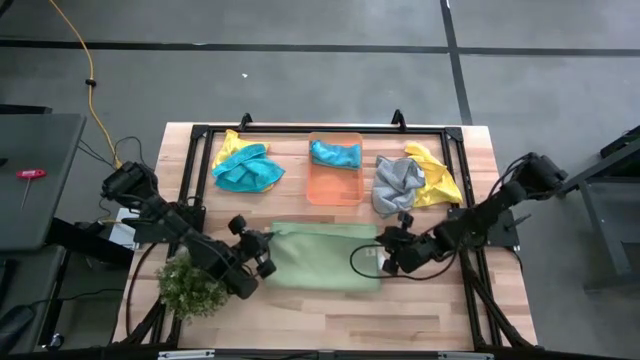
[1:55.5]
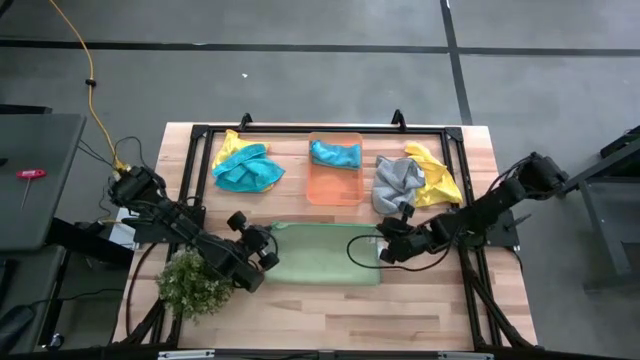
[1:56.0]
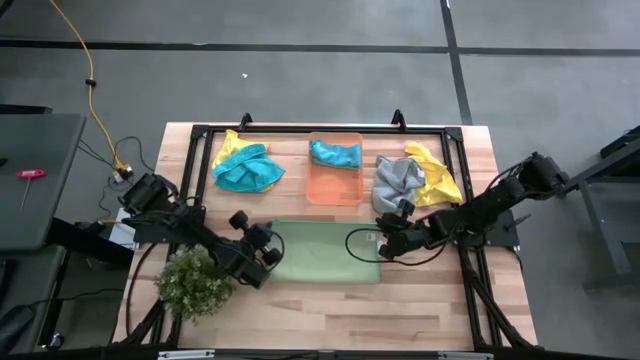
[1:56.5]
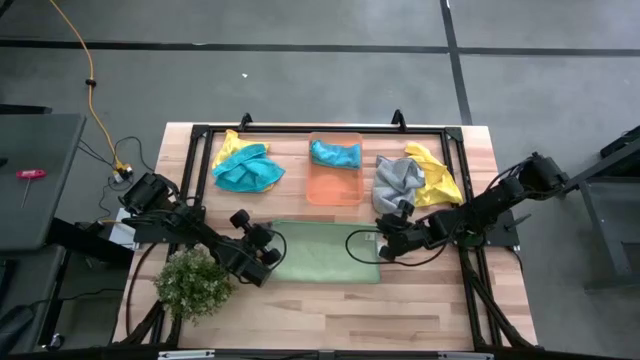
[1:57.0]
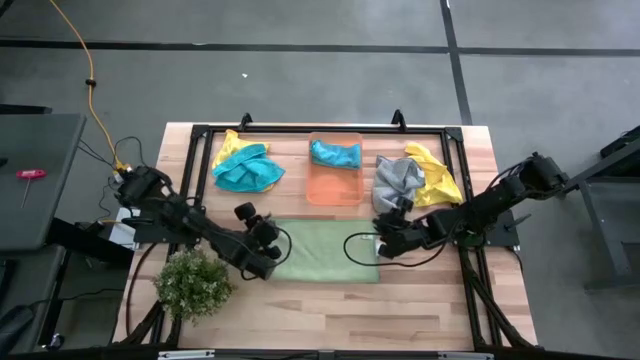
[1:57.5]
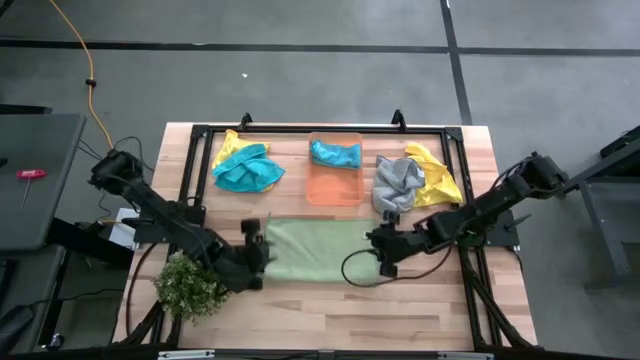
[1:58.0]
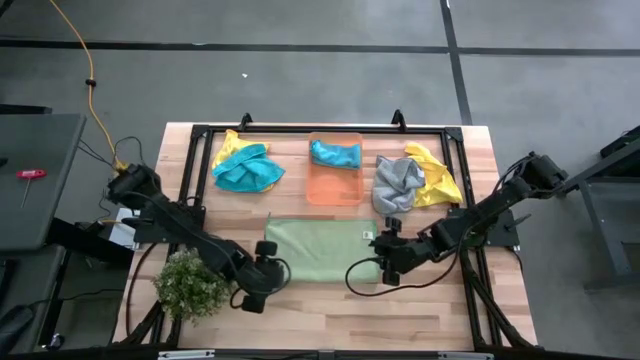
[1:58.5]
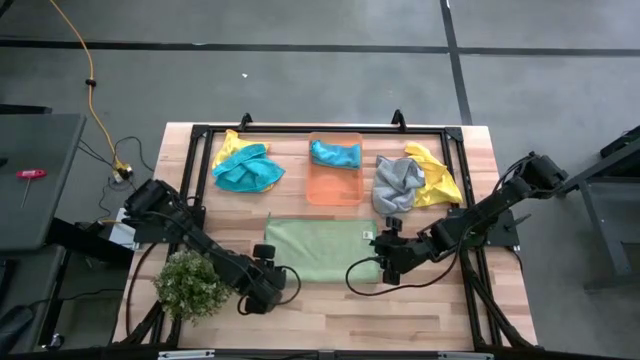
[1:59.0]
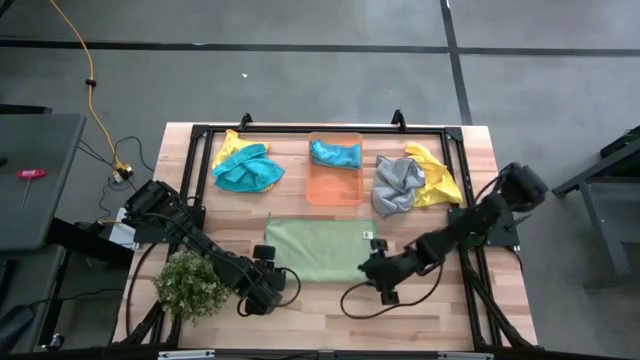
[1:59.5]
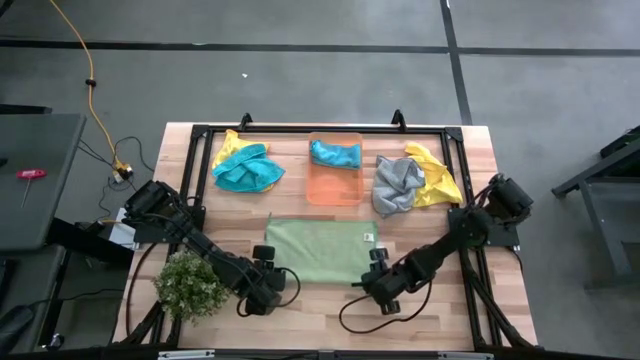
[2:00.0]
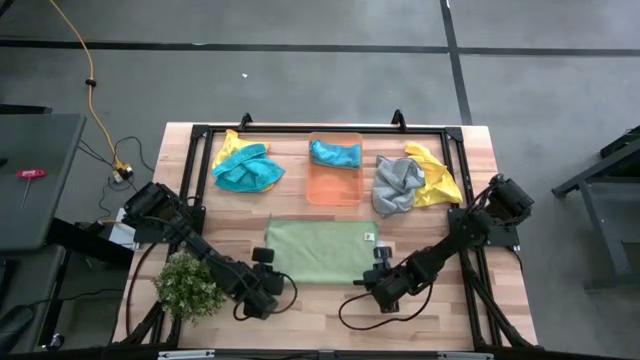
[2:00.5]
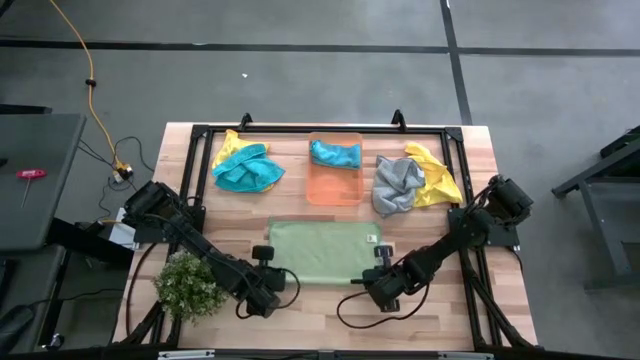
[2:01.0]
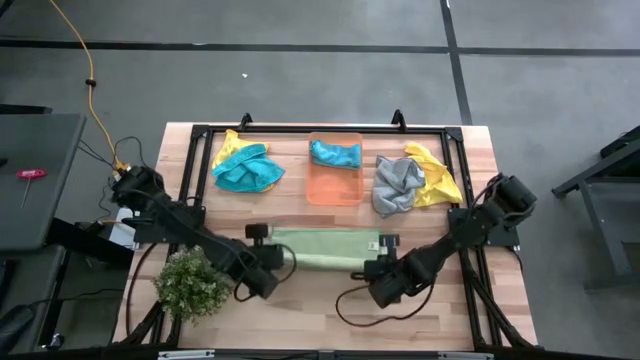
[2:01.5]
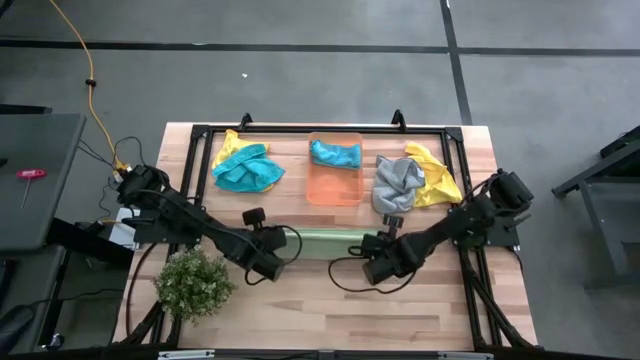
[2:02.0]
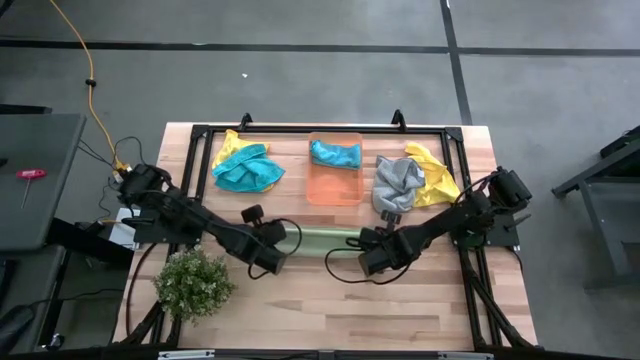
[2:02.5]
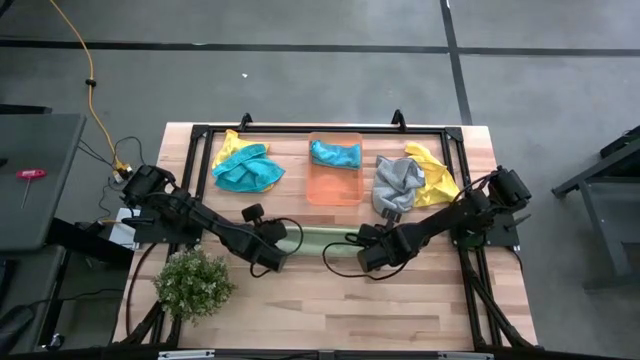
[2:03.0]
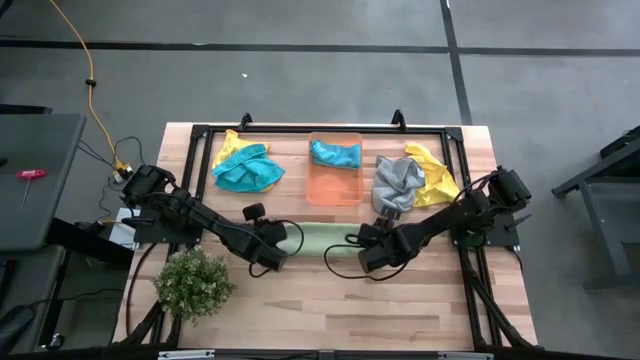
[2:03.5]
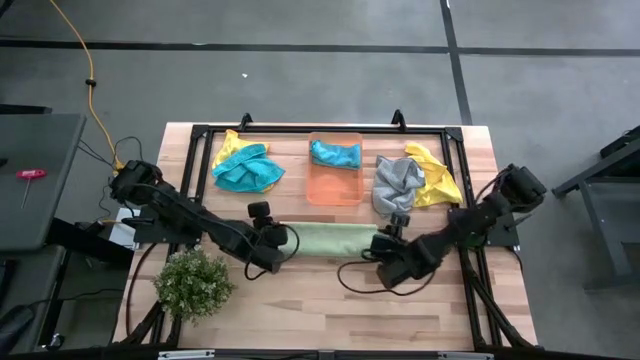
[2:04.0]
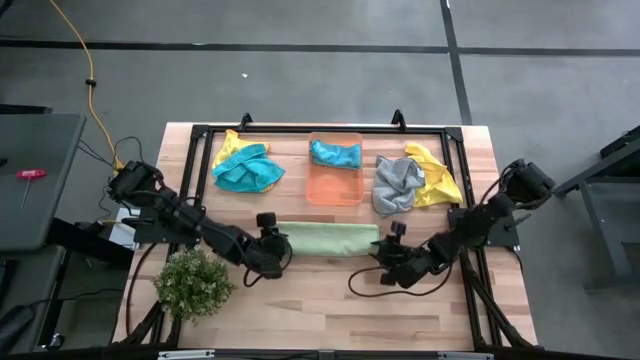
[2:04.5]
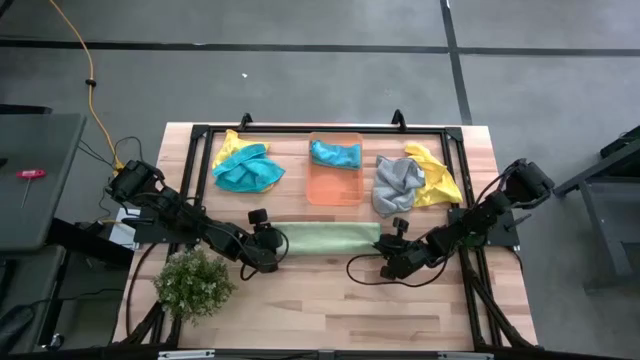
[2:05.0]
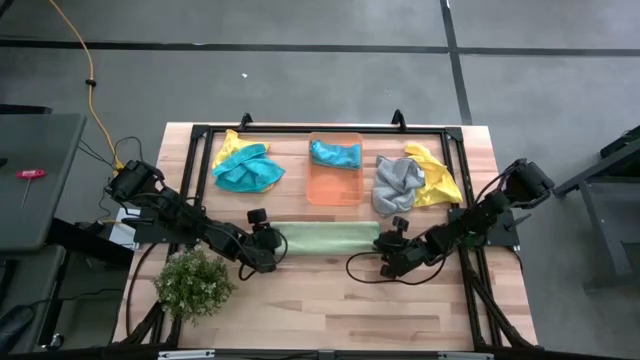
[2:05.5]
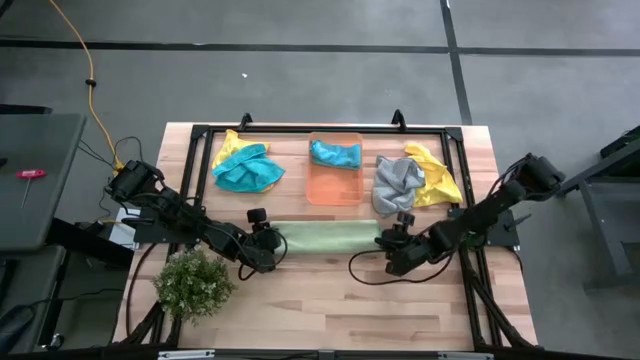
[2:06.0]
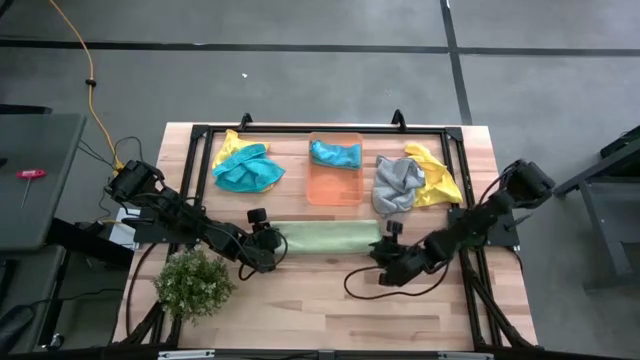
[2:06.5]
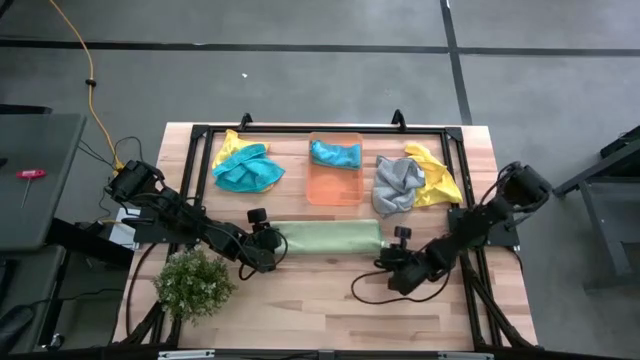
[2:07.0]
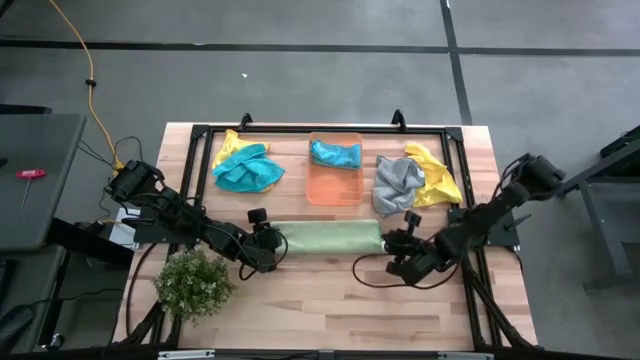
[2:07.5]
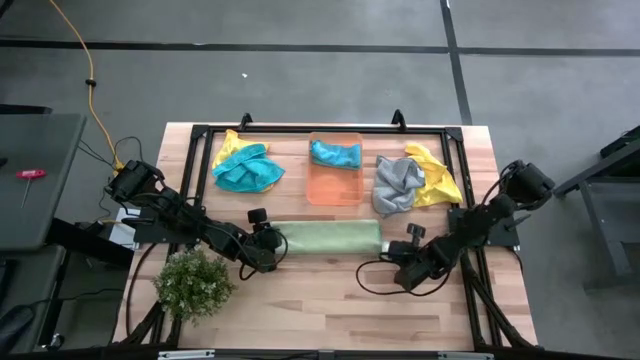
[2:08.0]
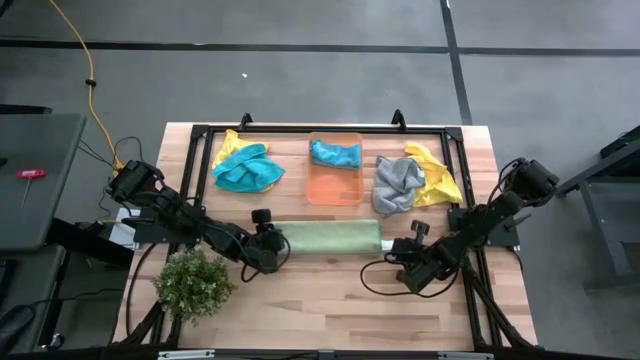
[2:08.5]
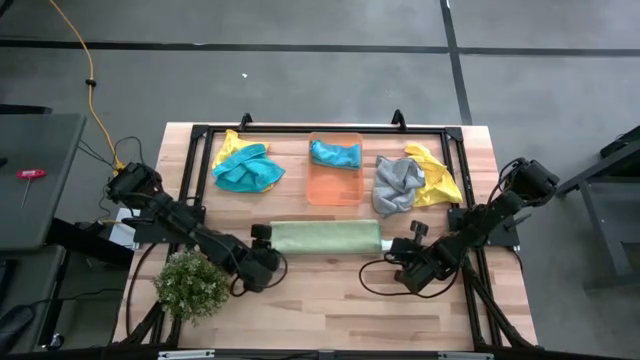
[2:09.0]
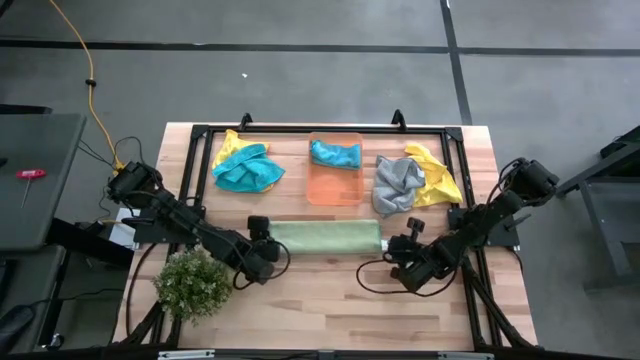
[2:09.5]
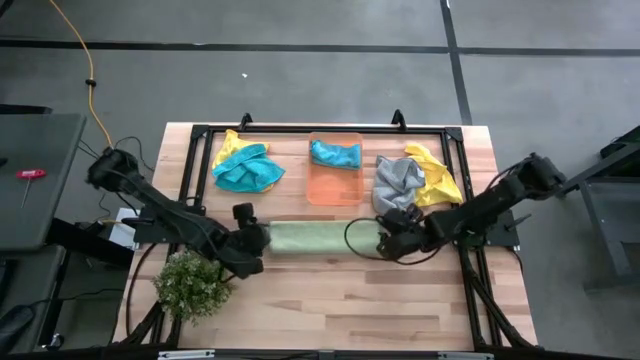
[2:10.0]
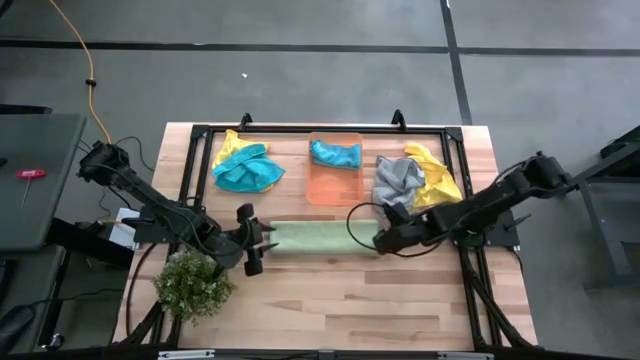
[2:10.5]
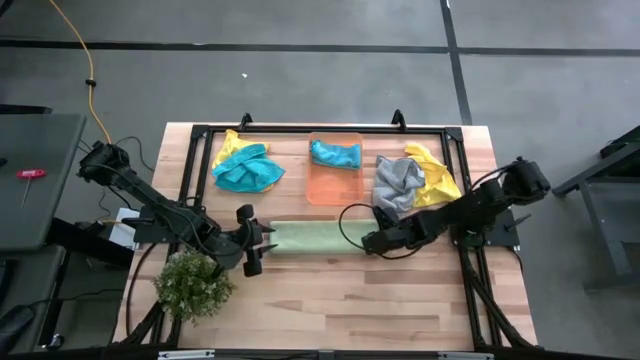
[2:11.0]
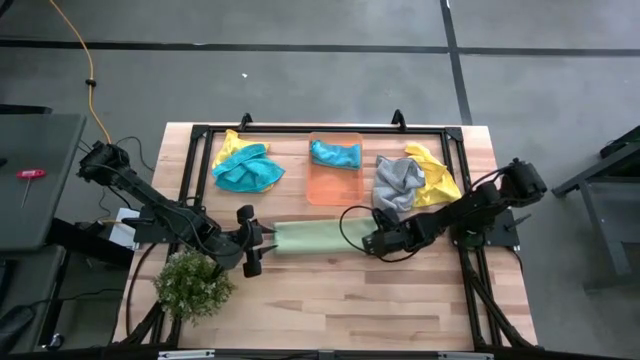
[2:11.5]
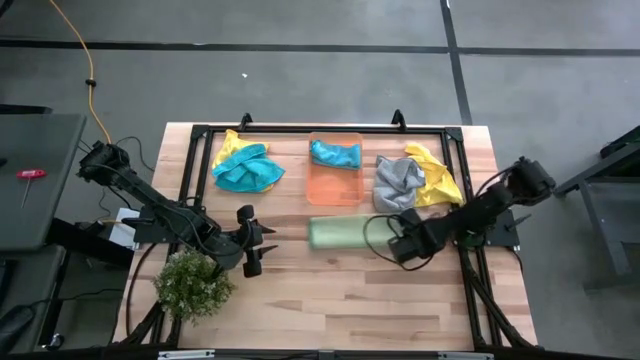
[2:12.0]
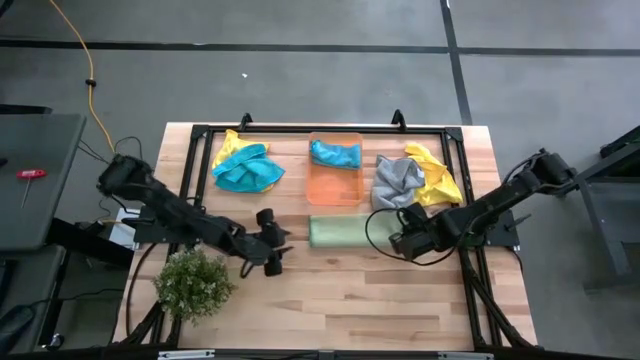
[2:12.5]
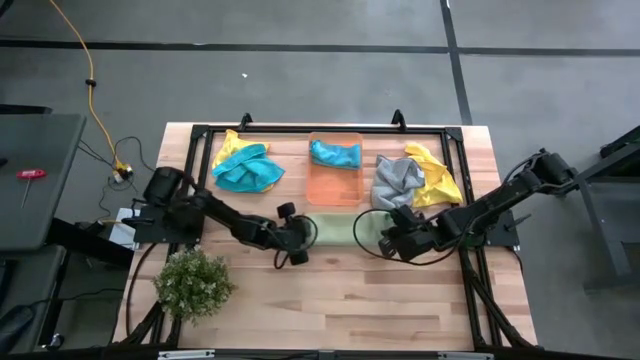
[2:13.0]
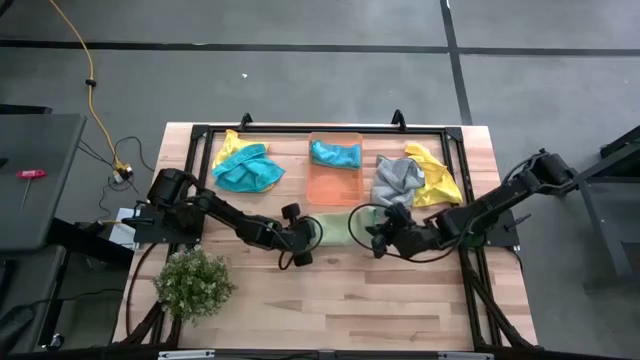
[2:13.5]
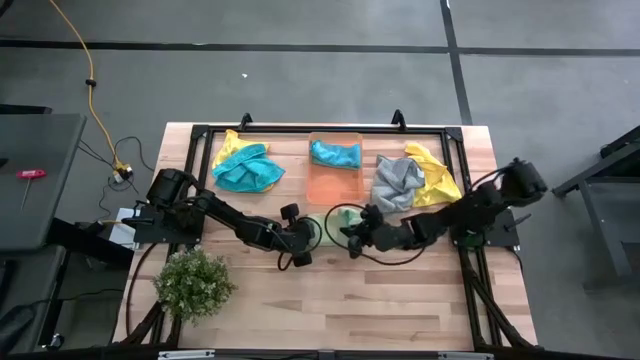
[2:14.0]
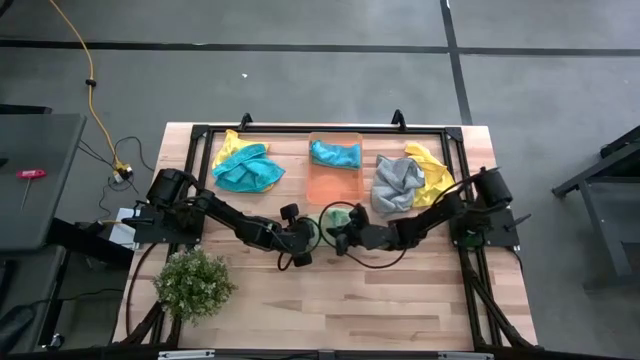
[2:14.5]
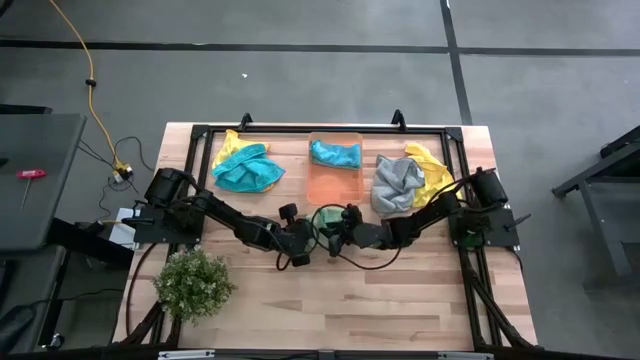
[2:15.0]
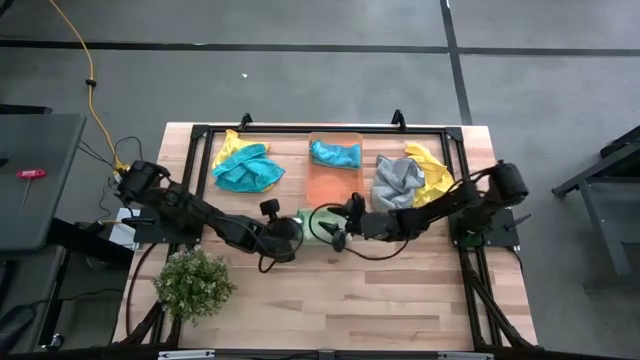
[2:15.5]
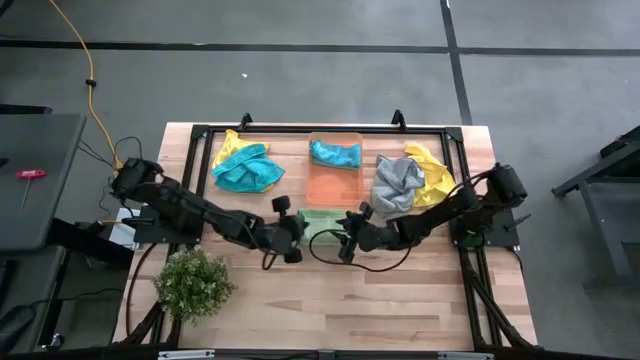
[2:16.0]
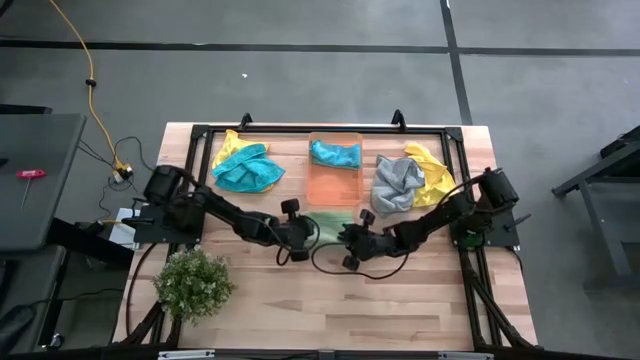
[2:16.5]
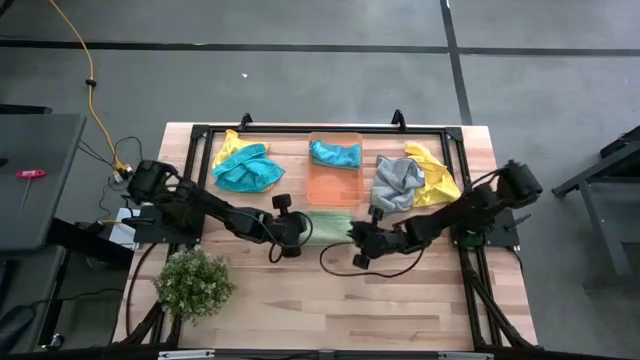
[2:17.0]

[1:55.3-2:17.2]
Task: Fold microfiber towels
Fold the green microfiber cloth
